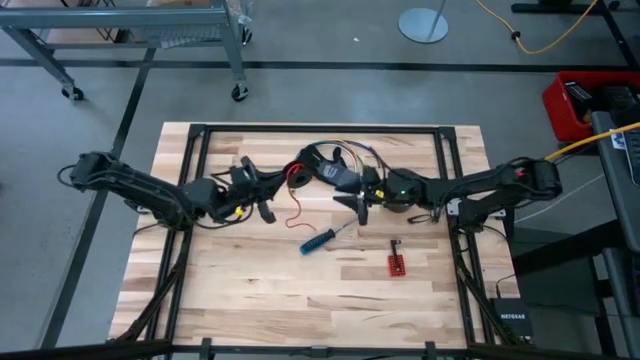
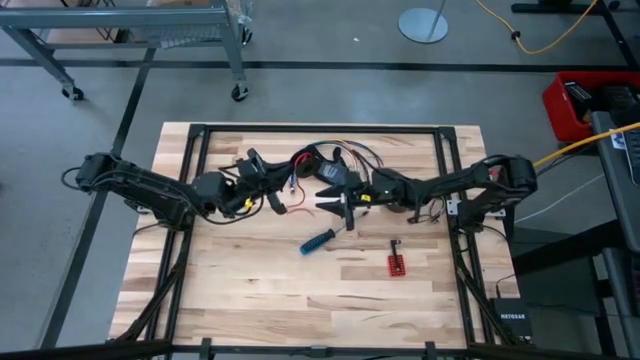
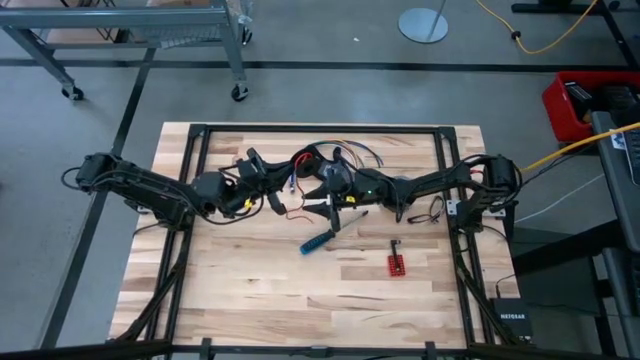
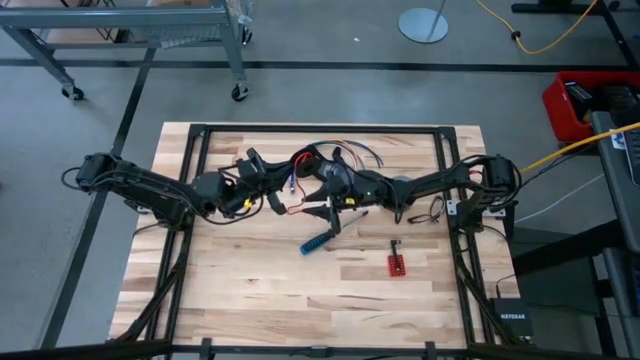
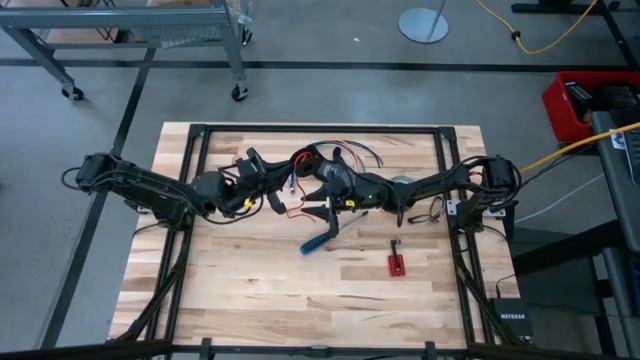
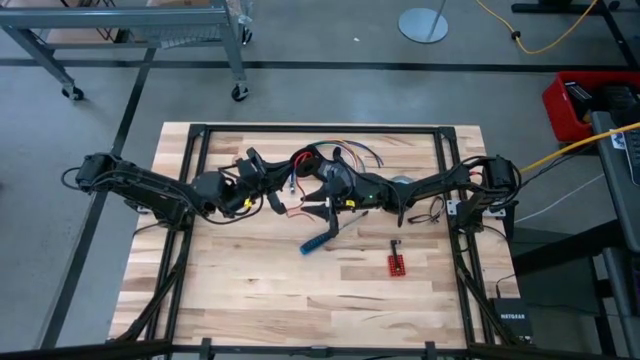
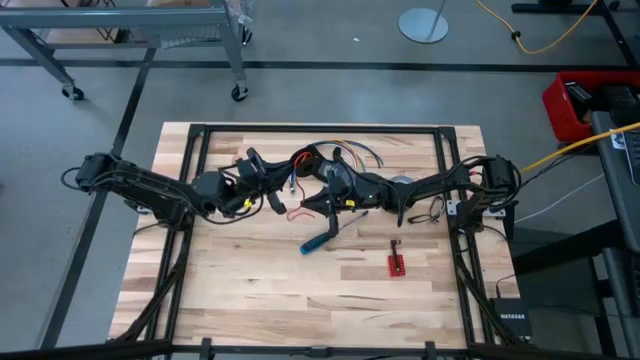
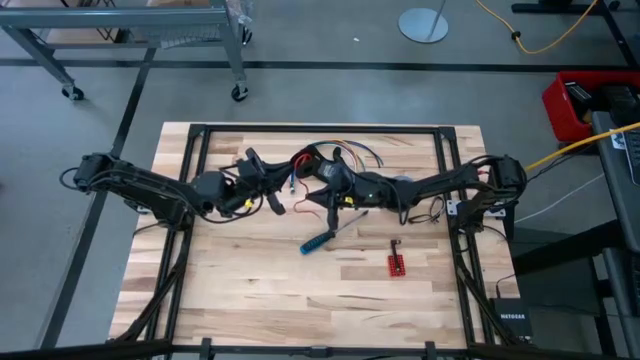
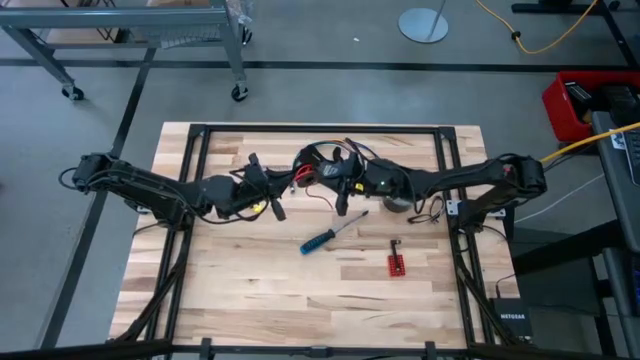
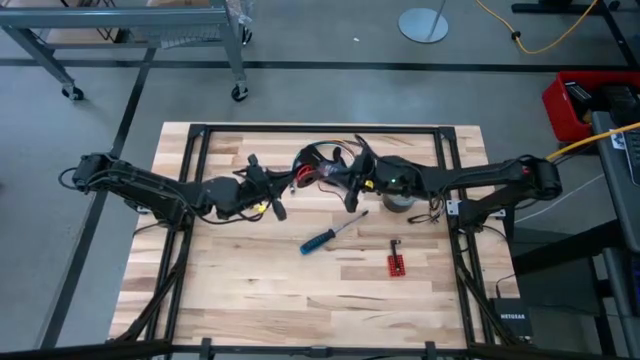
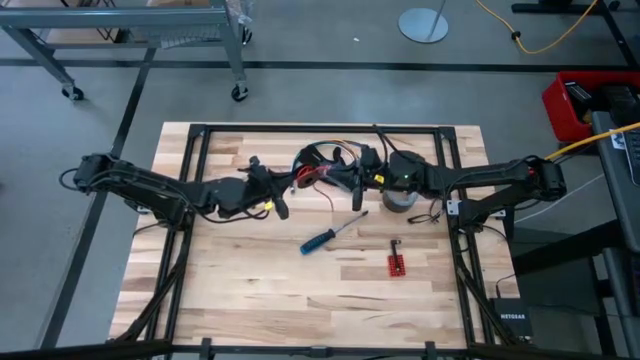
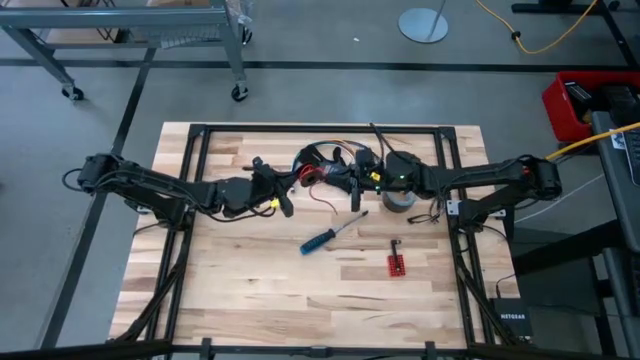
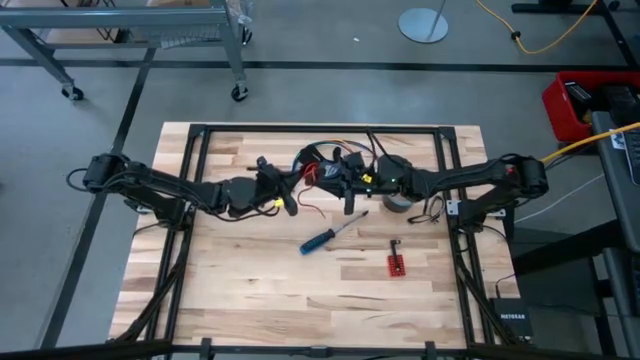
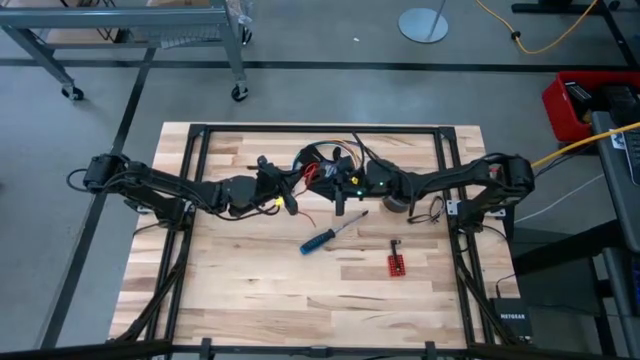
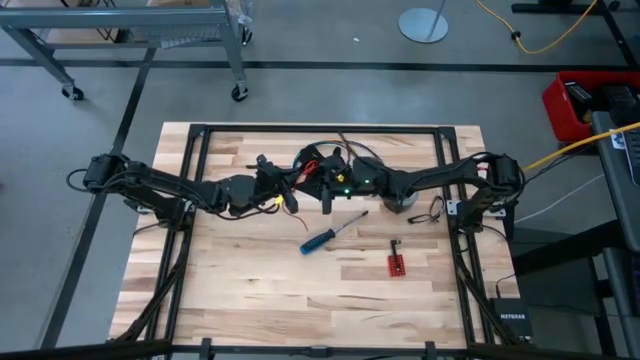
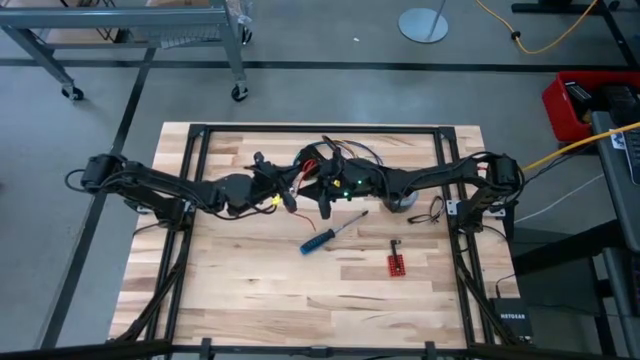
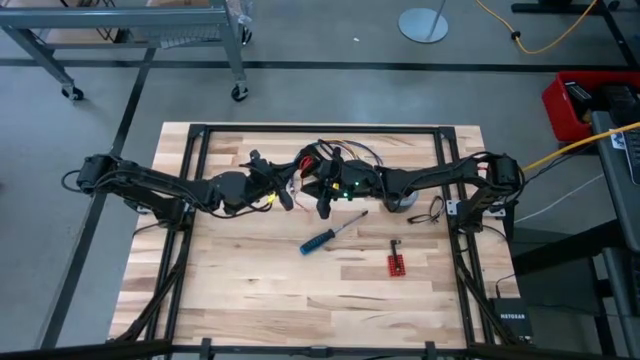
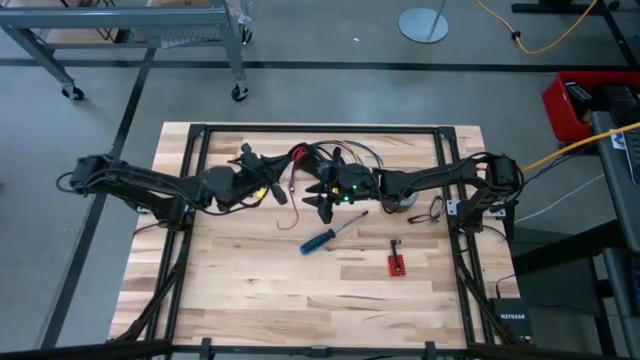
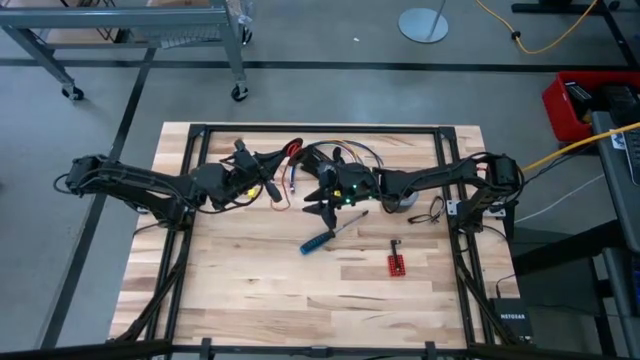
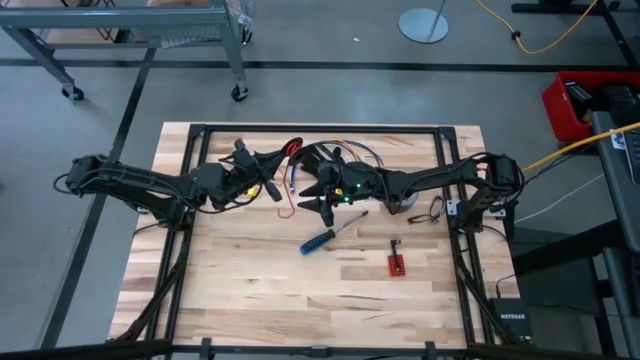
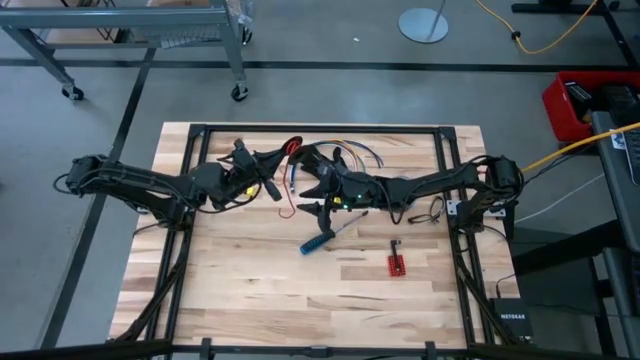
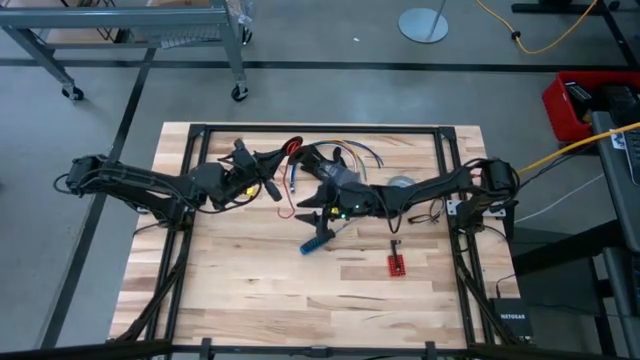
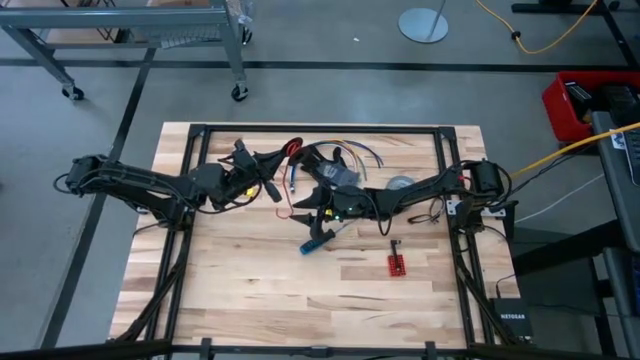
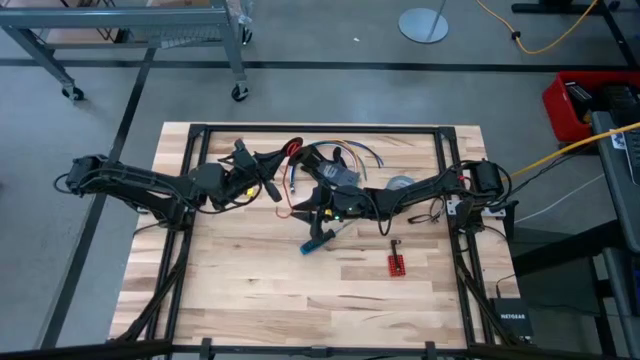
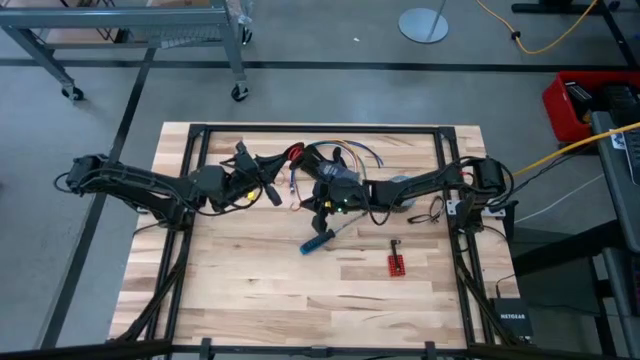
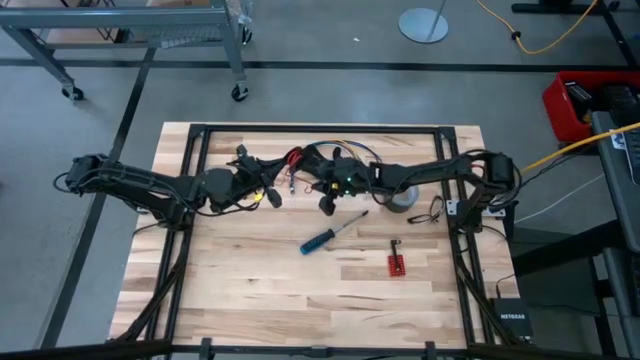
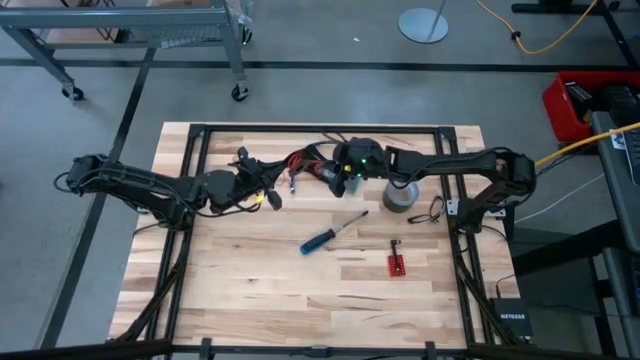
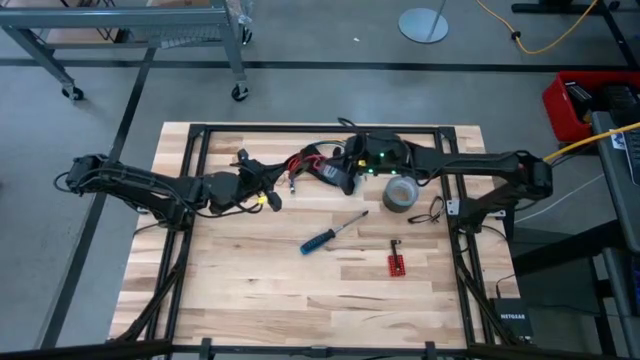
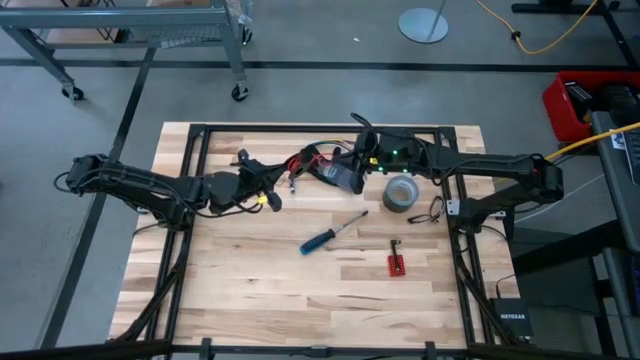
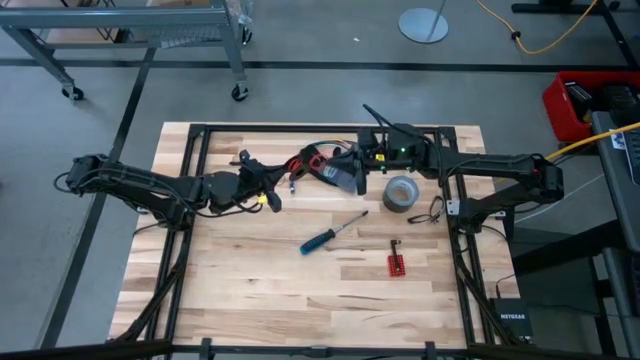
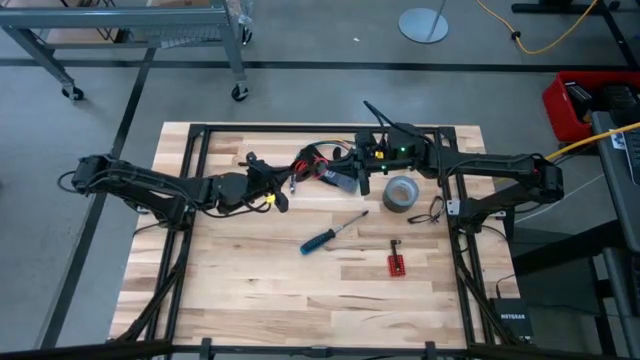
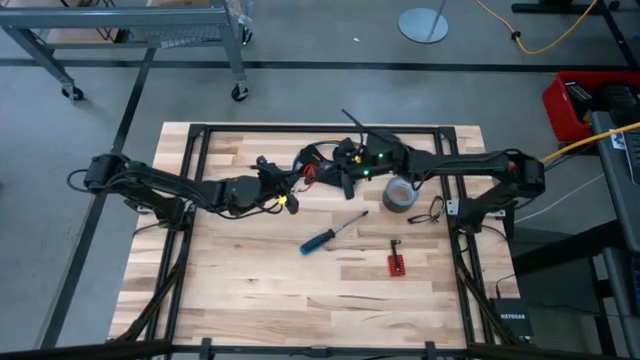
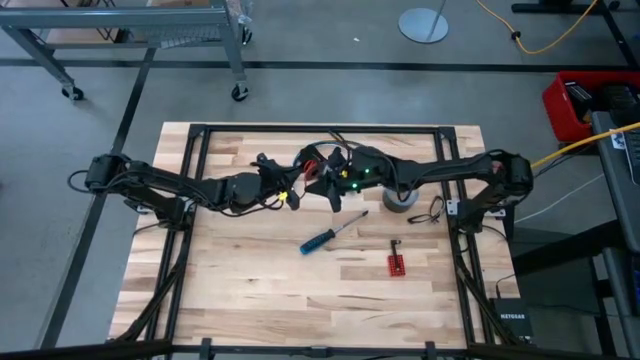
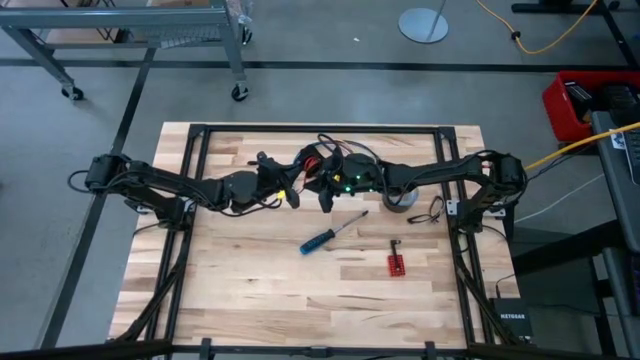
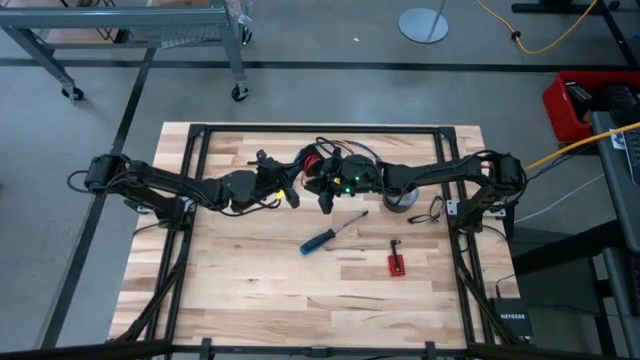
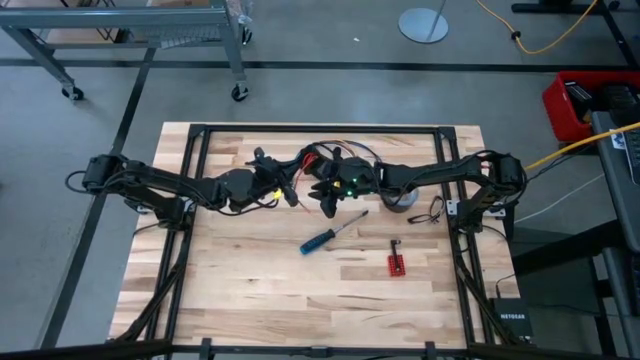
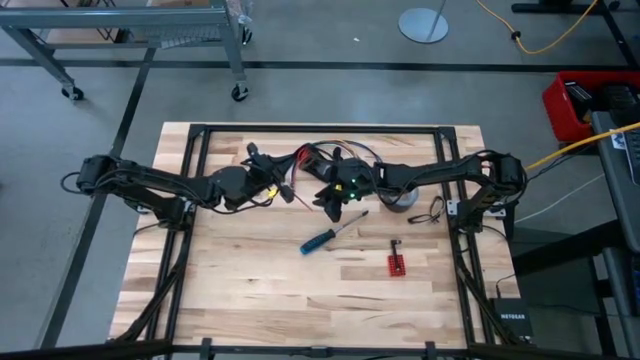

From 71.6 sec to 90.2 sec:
Task: Coil cords
Coil the red wire onto the spool

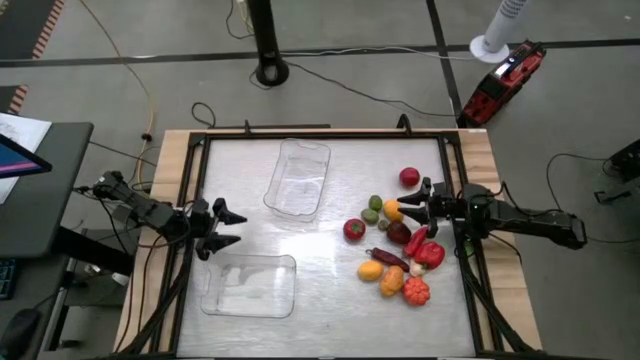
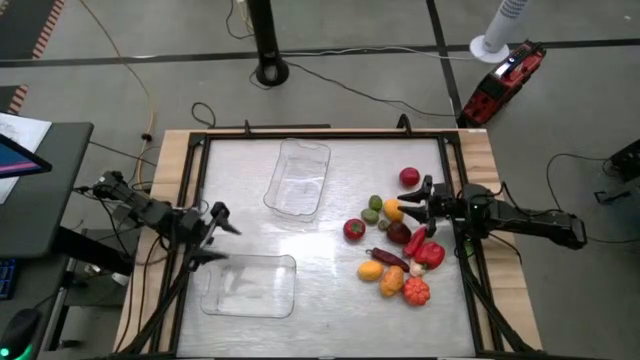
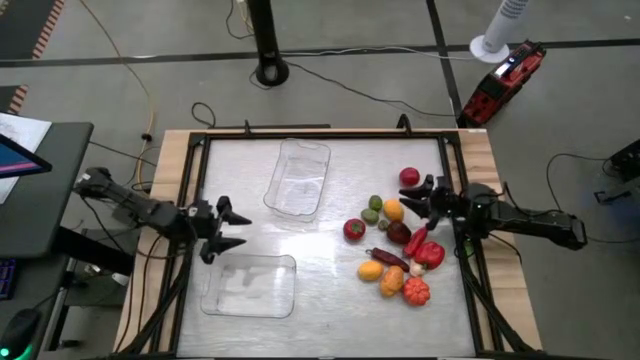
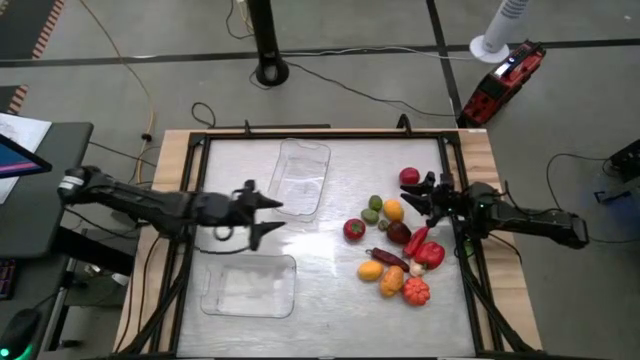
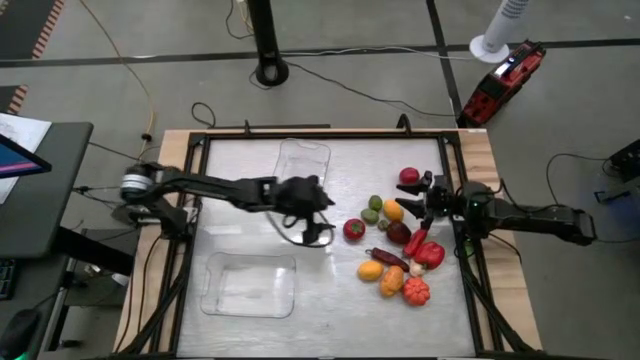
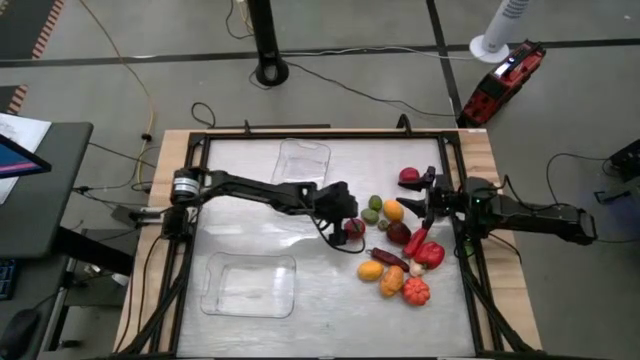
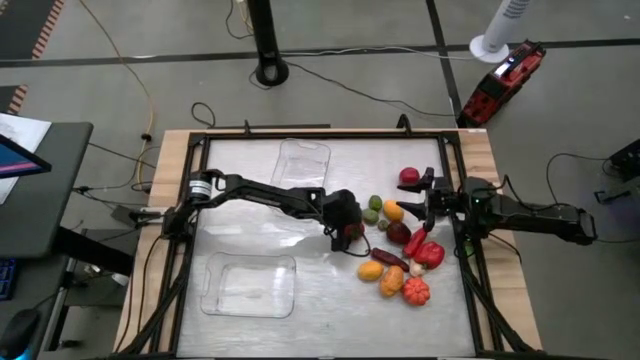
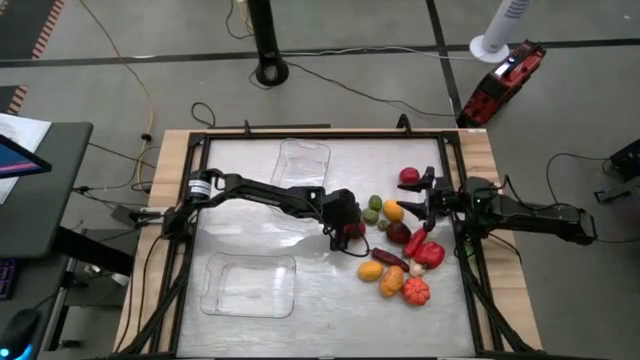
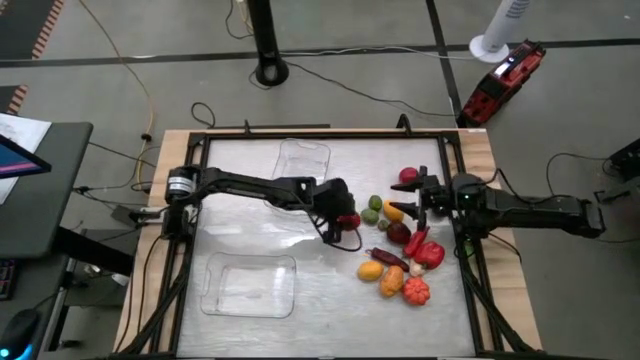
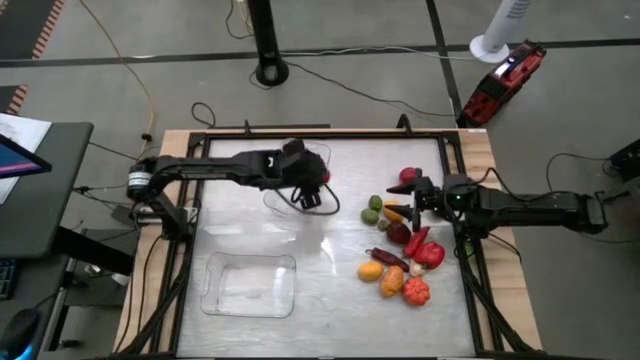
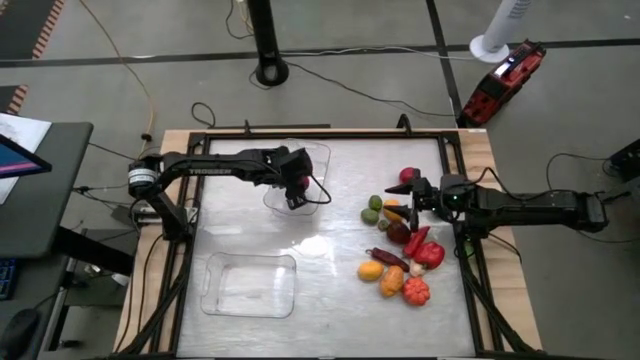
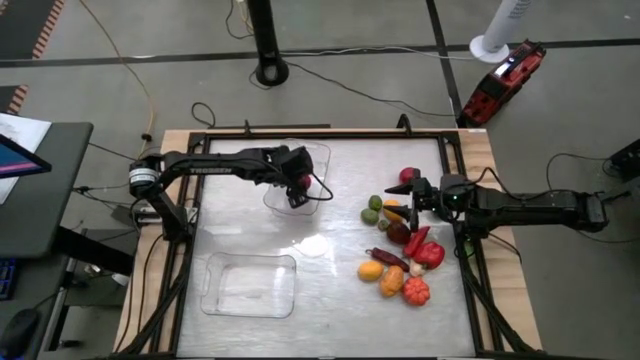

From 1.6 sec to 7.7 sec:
Task: Sort produce into baskets
Put the bottom tomato into the top transparent bin
